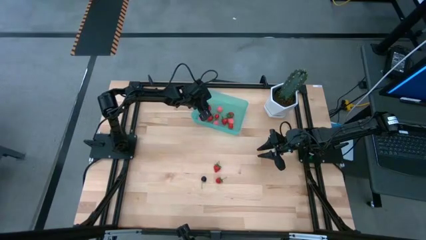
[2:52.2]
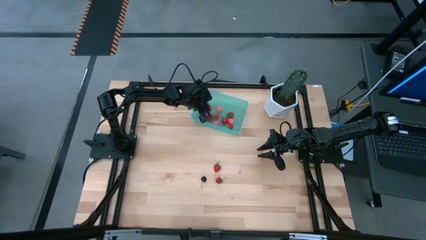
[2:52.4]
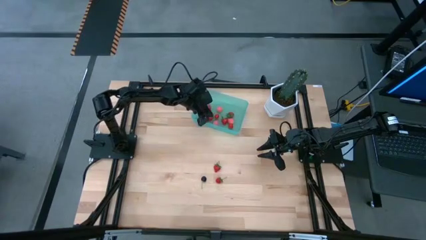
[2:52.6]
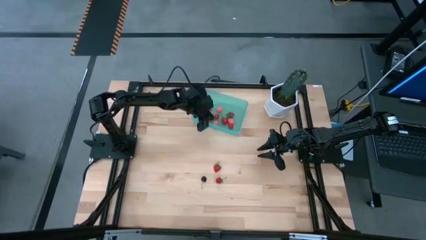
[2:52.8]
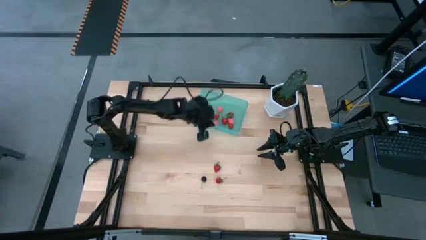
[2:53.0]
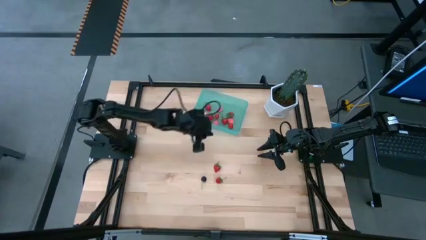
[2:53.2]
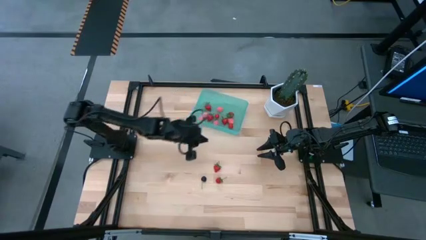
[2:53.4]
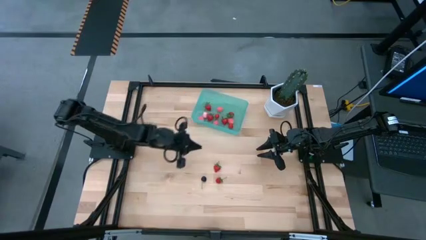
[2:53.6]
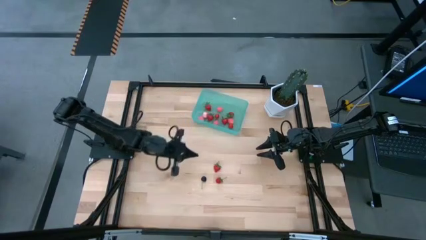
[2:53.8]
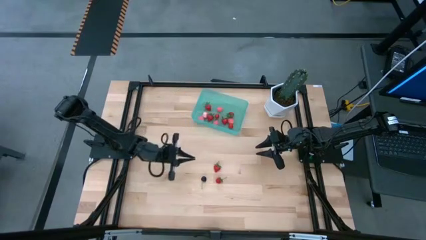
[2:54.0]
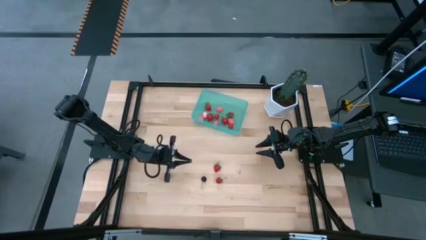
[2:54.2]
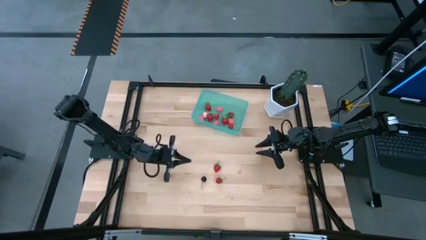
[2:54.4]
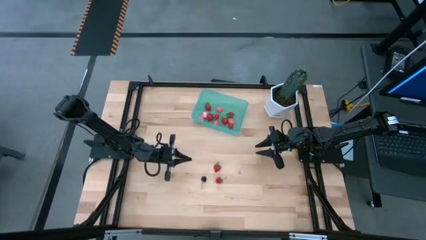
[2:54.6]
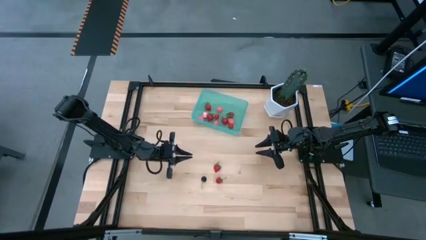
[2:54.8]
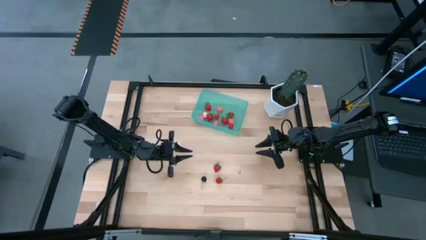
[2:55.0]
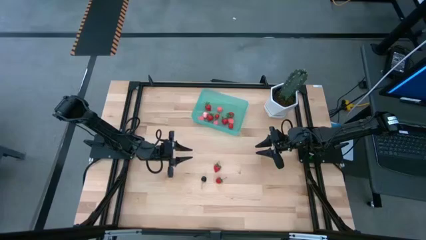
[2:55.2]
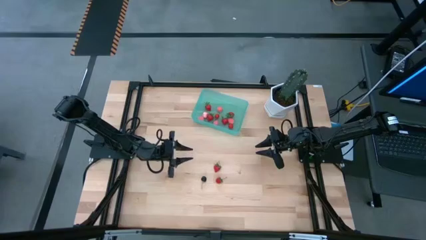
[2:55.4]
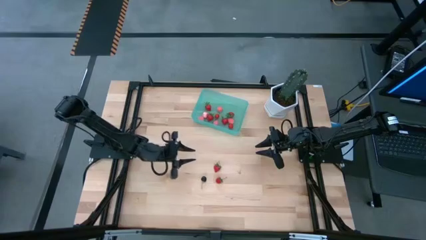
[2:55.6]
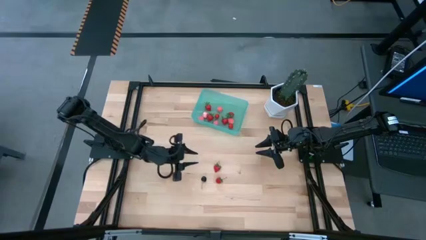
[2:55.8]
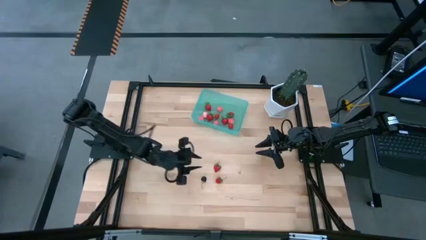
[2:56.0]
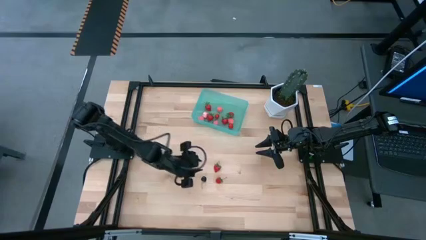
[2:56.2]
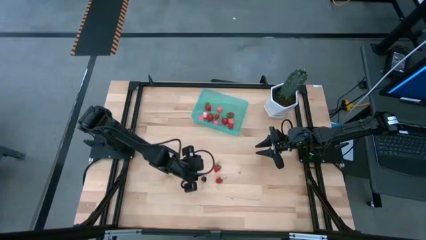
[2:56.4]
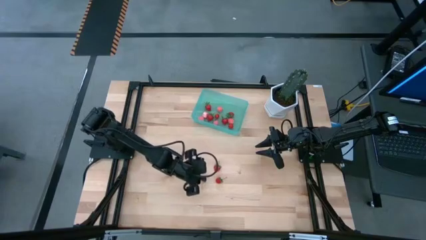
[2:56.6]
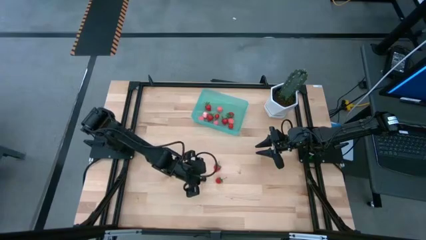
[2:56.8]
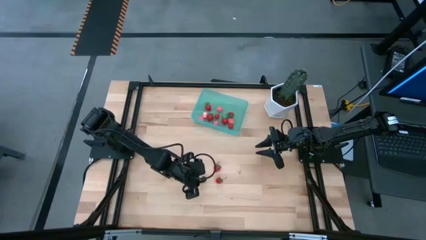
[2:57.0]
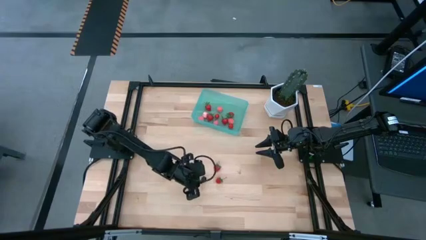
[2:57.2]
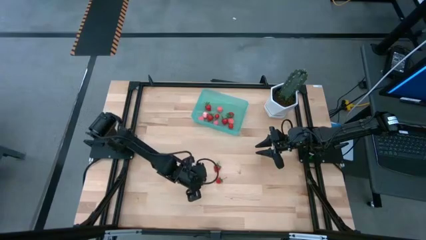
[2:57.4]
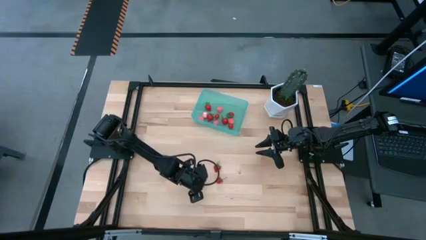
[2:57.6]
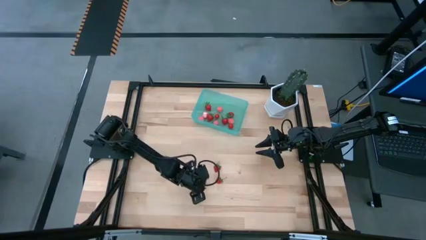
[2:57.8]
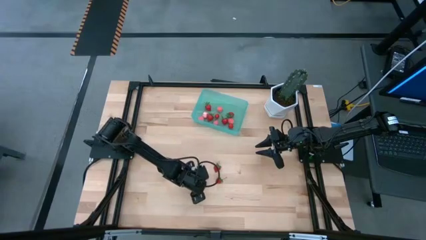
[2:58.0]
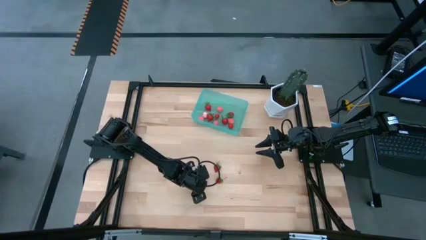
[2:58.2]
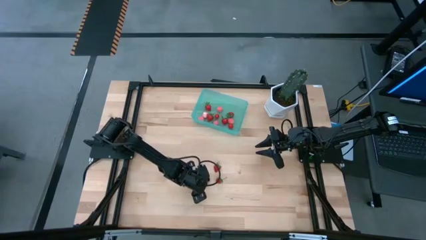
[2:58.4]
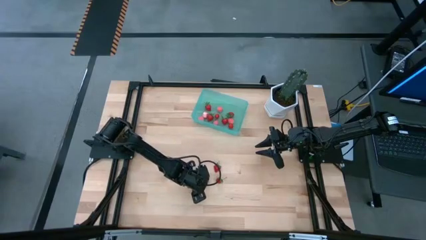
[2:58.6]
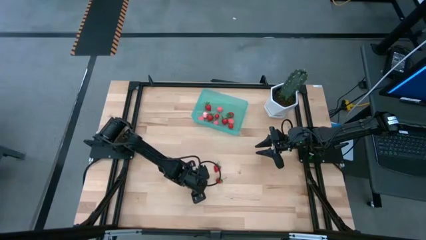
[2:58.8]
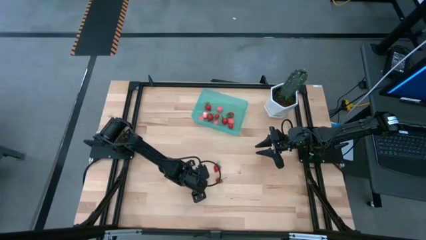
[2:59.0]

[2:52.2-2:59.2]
Task: Pick and placing Produce into tupperware
Put the black cherry into the light blue bin

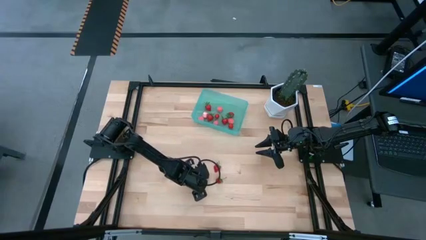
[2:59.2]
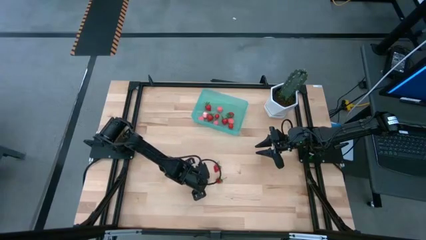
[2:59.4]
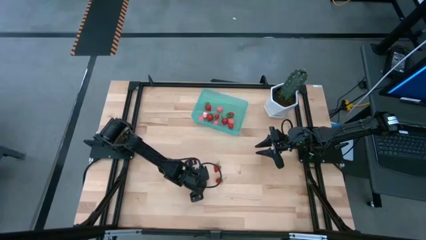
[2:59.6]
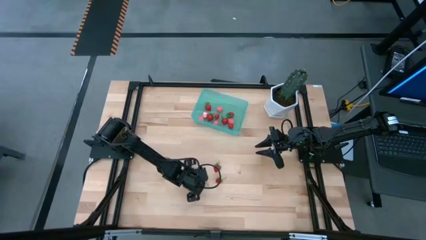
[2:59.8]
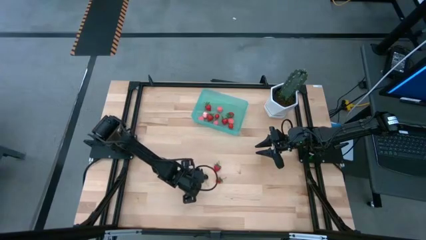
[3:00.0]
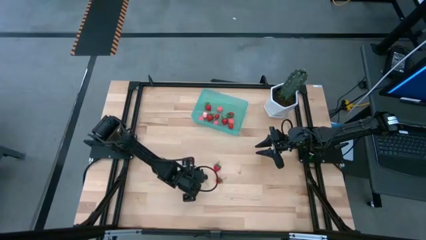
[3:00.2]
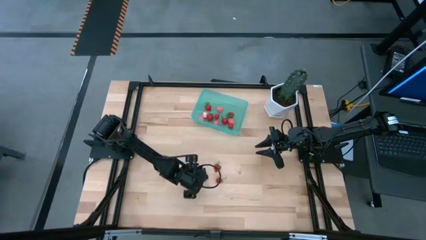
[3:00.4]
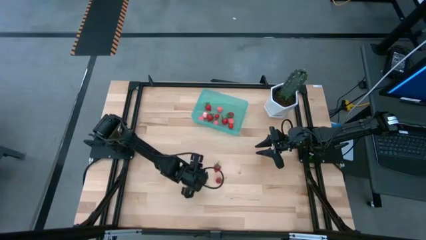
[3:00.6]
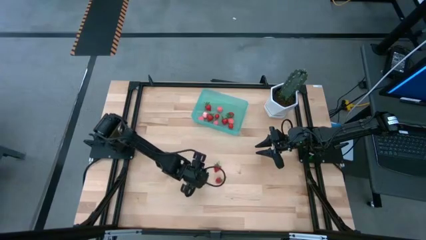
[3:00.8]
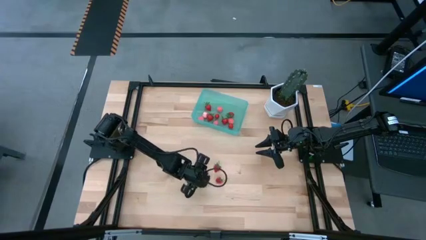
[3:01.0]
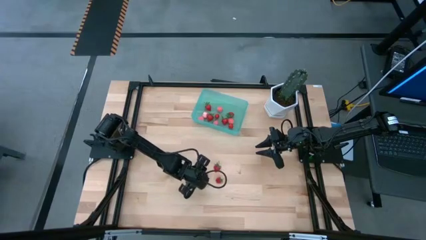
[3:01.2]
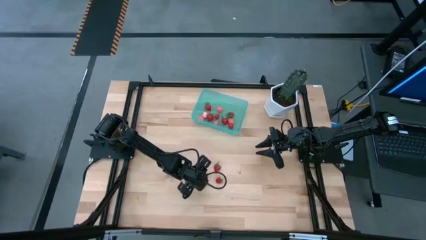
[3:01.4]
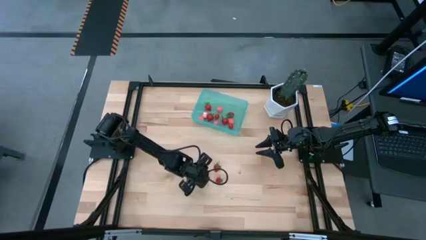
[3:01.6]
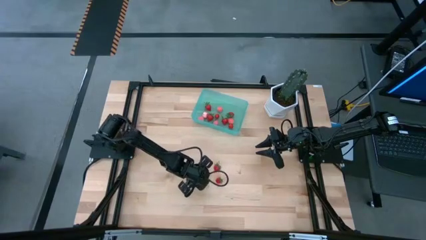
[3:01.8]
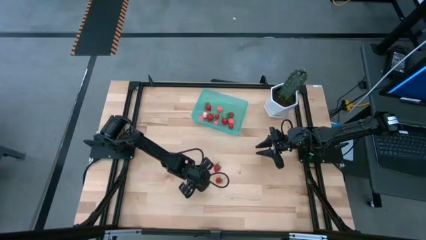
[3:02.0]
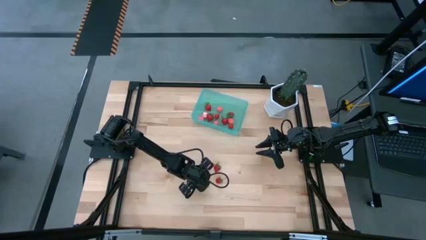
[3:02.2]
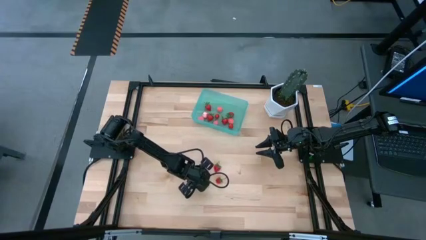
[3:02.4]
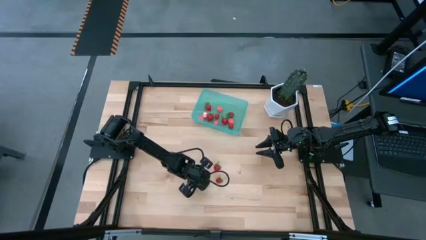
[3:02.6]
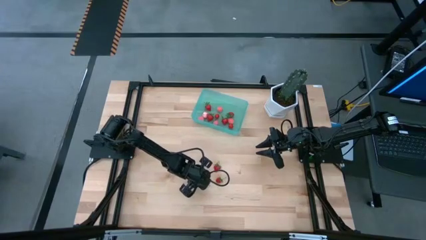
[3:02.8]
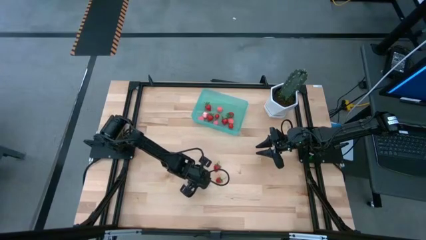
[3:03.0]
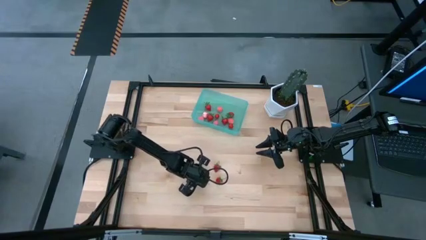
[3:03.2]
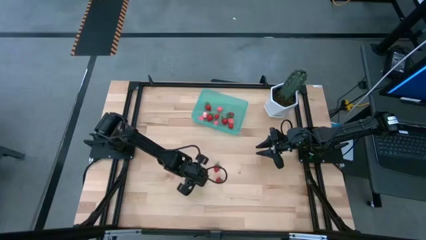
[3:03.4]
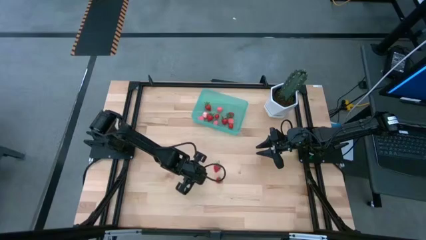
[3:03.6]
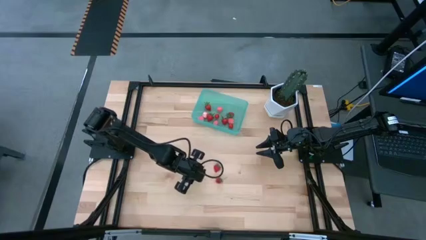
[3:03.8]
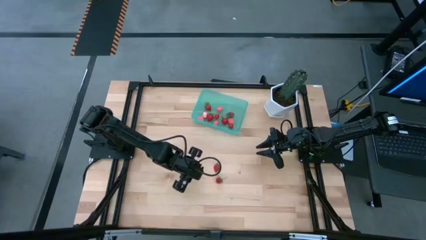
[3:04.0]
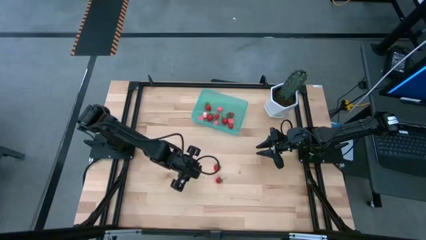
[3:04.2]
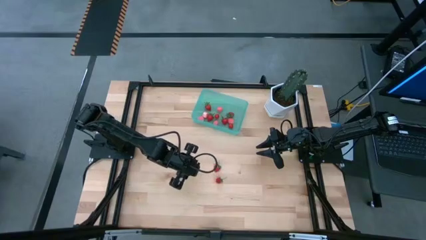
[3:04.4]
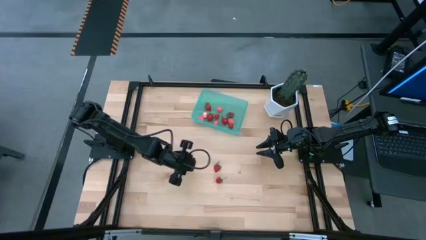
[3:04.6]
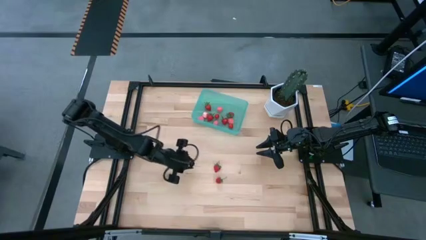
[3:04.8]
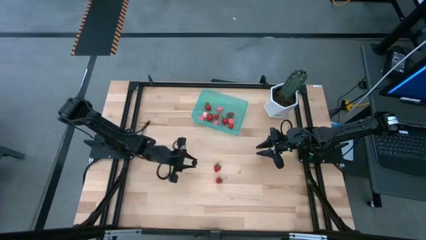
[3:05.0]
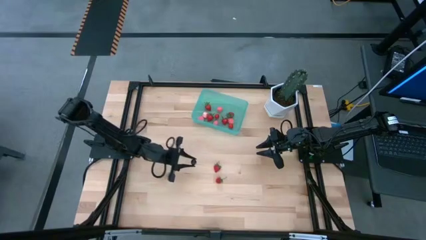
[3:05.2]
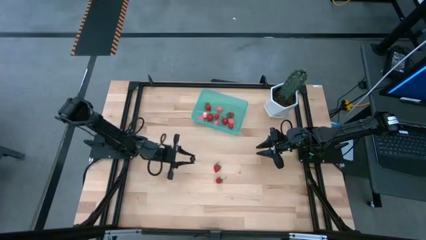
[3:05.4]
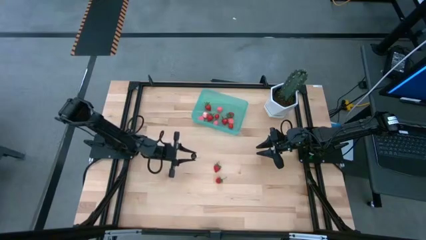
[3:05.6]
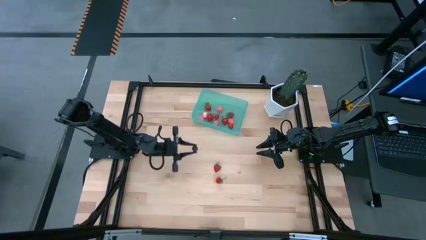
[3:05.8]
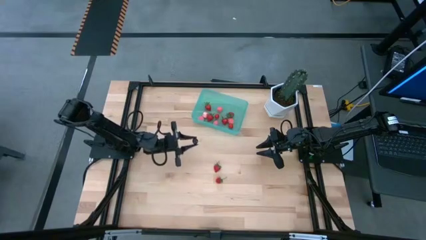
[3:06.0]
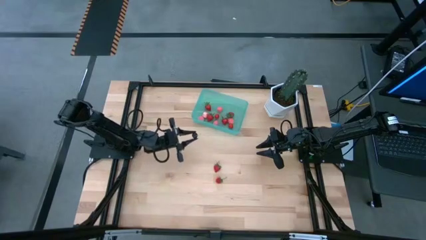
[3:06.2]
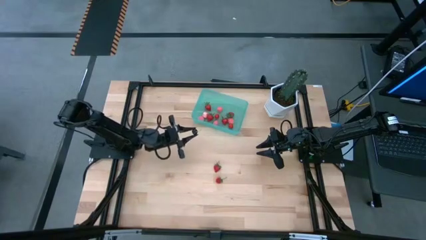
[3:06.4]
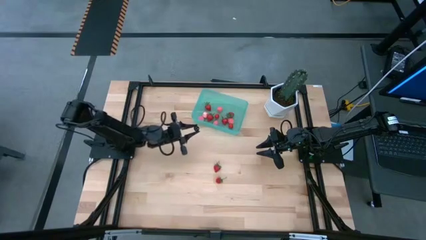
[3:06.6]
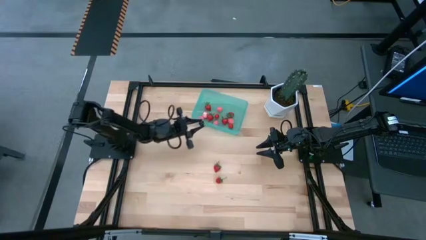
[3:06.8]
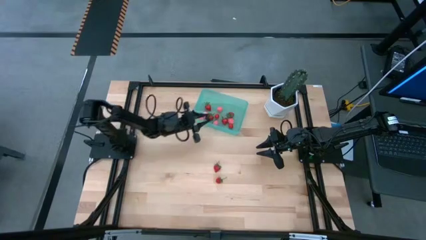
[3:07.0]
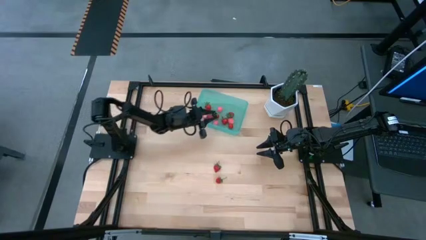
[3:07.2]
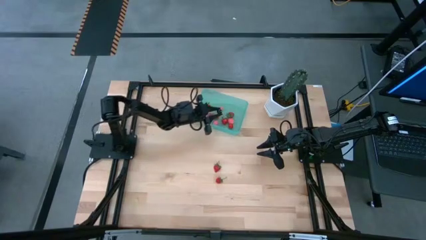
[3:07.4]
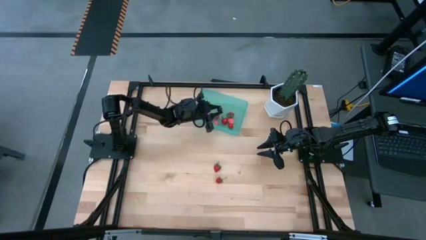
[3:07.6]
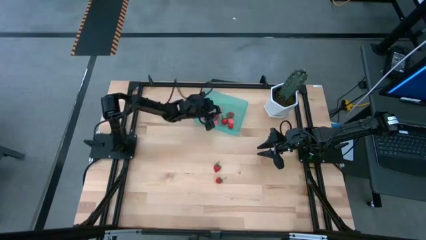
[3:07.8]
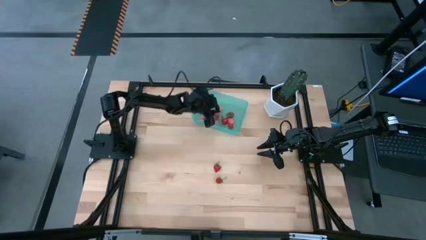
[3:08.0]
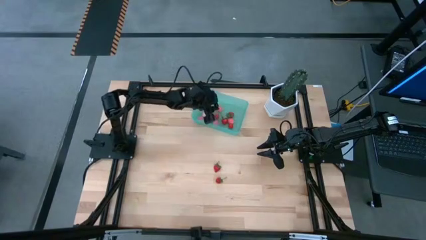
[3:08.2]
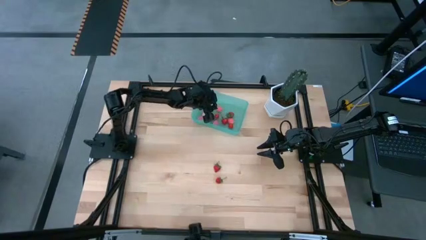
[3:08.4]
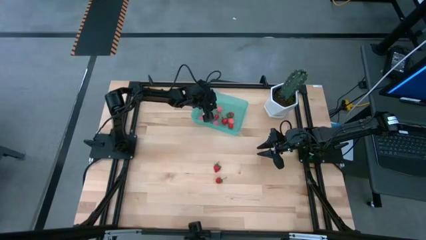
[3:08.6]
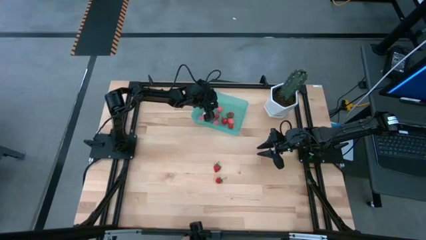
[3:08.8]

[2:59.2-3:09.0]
Put the black cherry into the light blue bin
